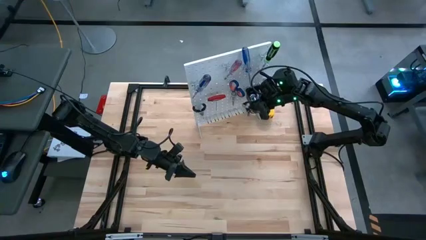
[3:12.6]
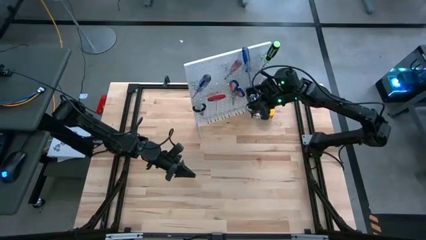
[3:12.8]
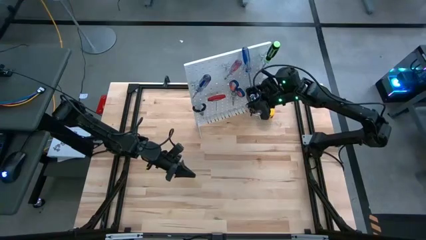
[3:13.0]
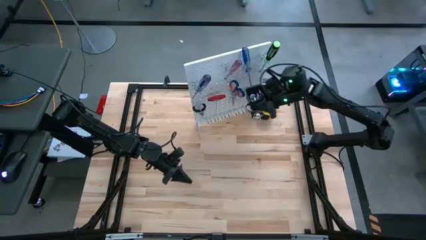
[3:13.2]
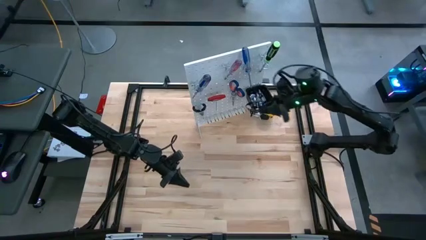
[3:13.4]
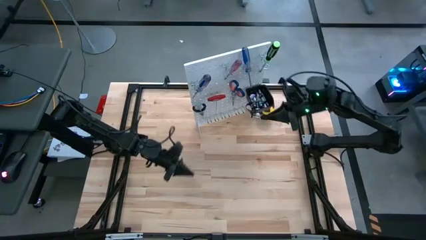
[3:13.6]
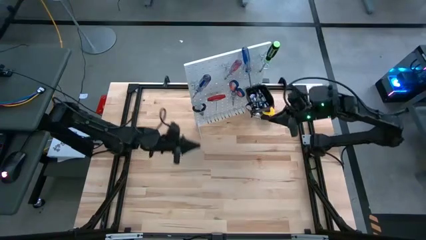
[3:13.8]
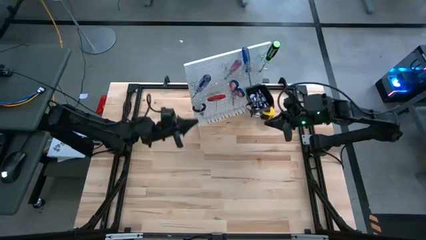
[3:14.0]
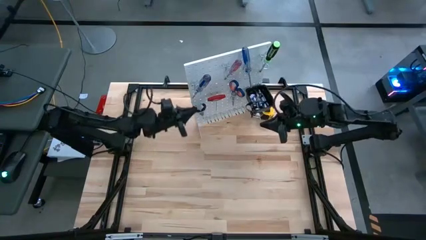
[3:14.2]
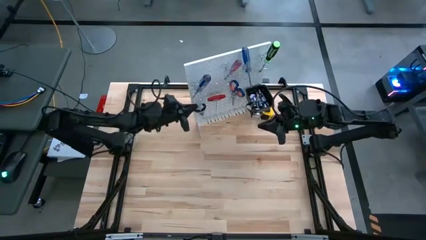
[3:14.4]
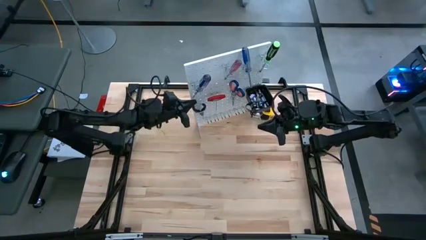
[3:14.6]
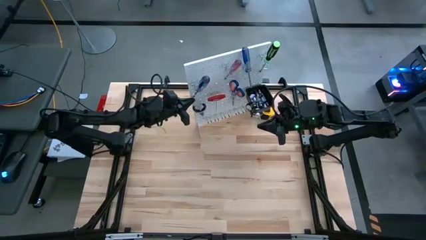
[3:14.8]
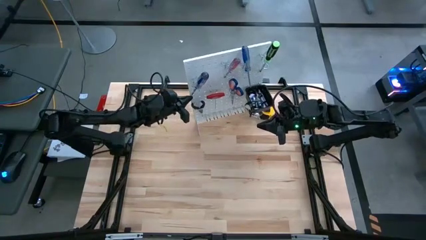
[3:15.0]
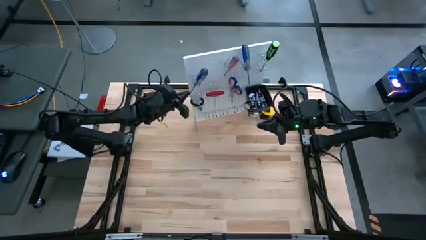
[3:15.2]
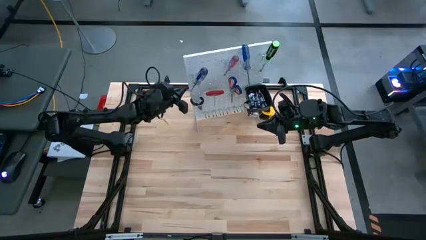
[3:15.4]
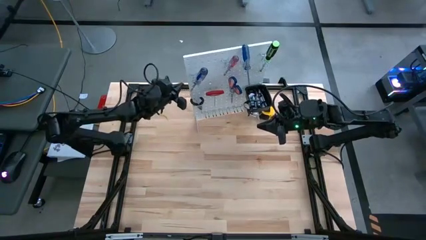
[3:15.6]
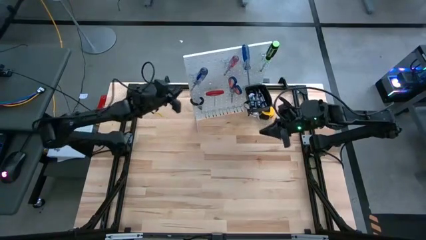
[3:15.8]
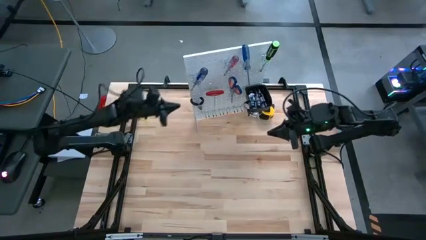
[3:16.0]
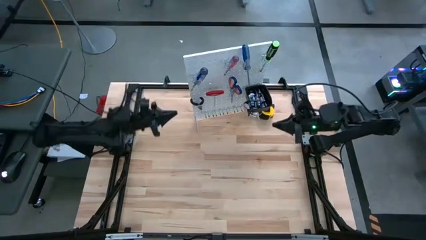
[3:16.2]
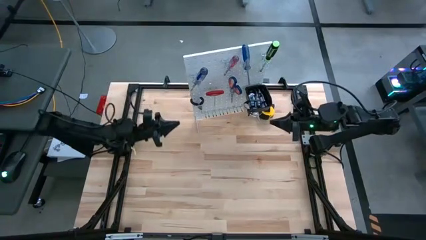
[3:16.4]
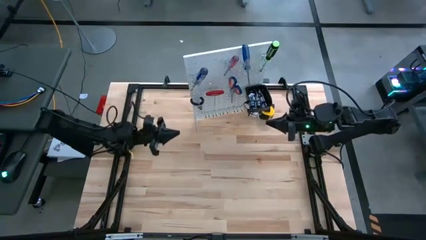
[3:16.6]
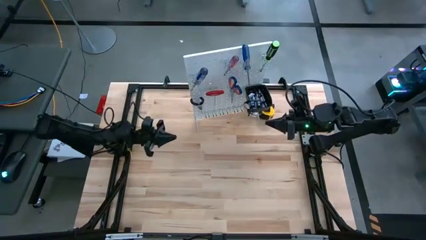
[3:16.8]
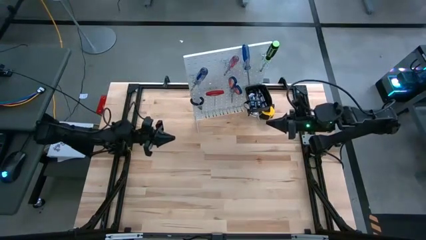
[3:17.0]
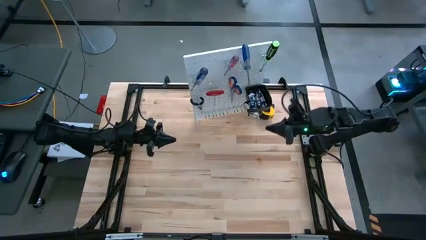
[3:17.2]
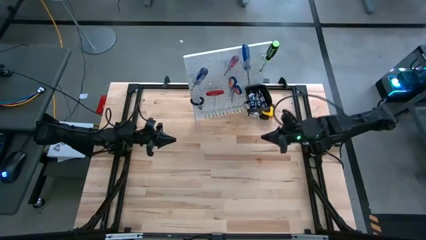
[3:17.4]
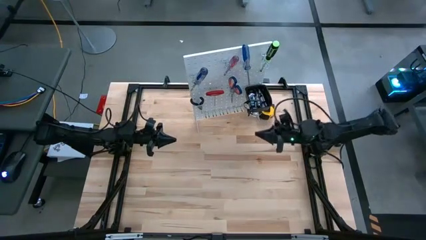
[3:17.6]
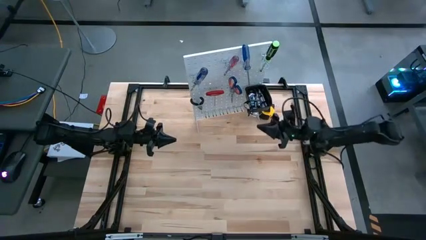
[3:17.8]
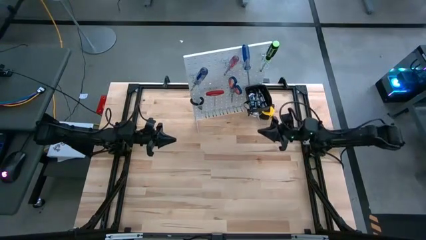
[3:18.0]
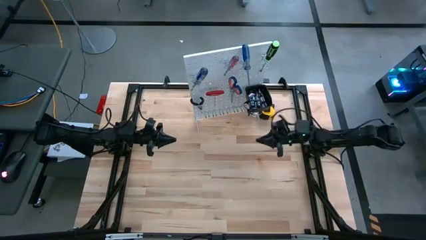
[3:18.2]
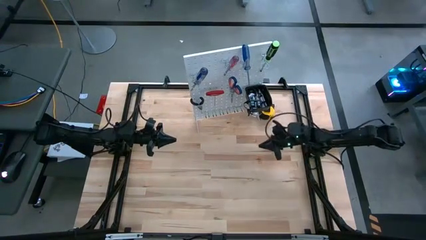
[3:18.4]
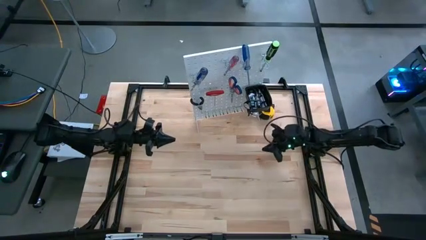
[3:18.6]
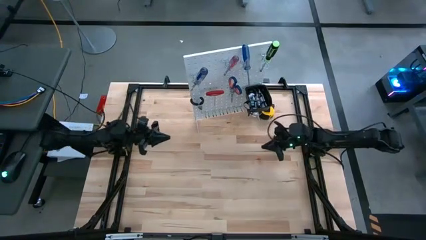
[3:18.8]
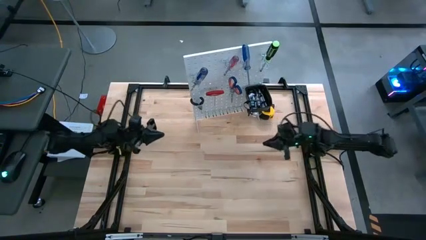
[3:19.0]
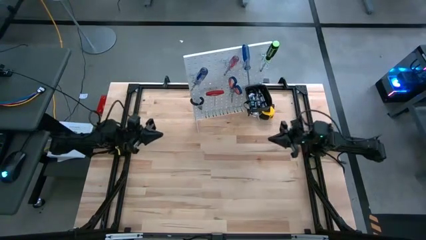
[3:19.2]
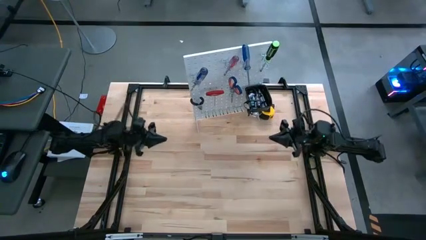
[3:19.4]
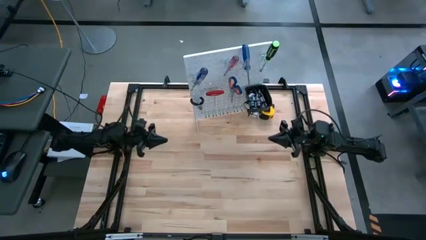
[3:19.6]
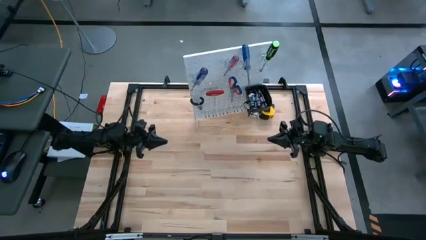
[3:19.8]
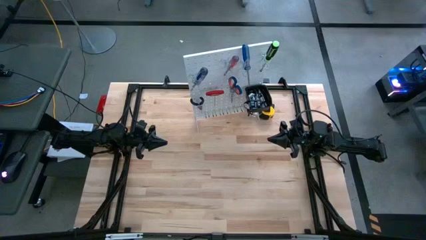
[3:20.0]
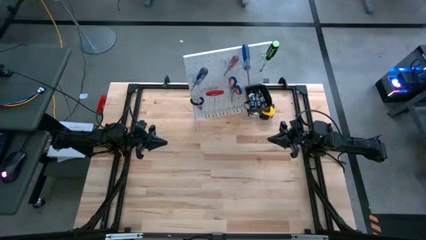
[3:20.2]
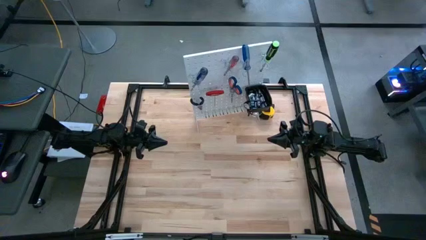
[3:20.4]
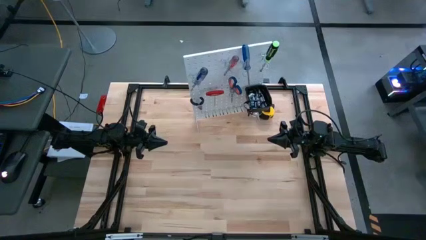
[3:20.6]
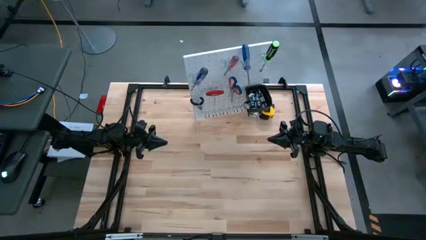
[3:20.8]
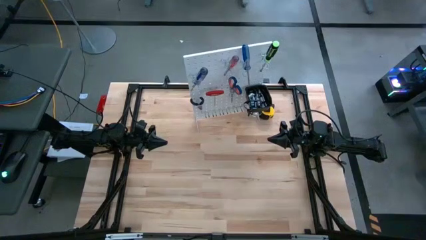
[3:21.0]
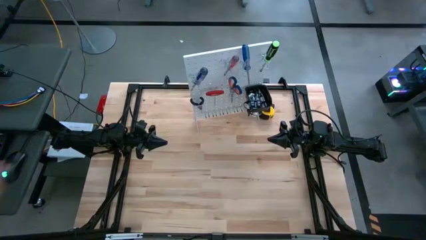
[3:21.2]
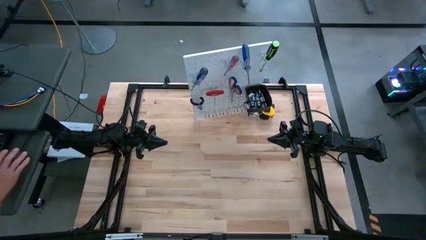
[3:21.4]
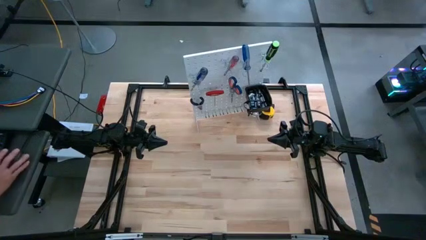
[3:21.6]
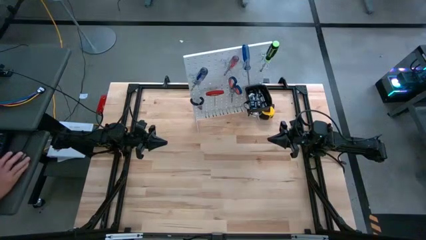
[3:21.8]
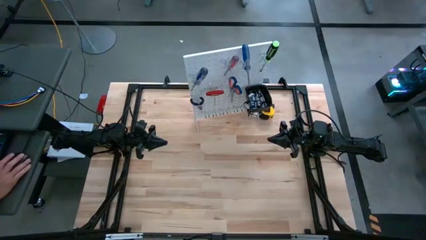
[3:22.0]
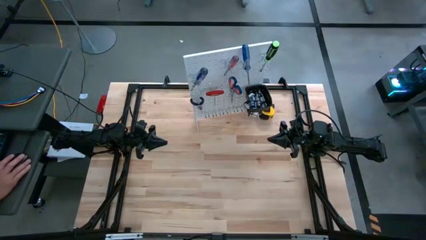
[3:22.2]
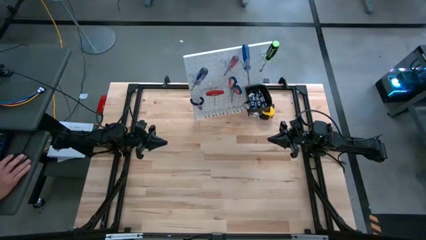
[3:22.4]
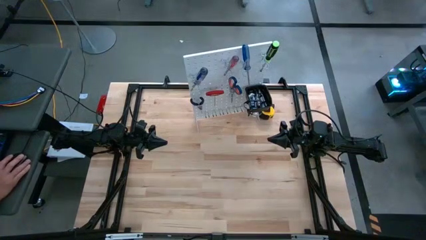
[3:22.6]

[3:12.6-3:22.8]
Task: Hang tools onto peg board
Return to Home Position

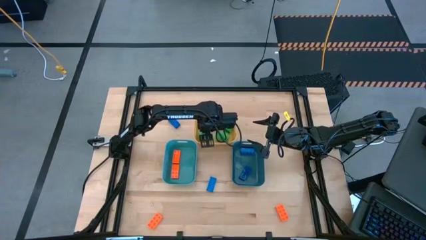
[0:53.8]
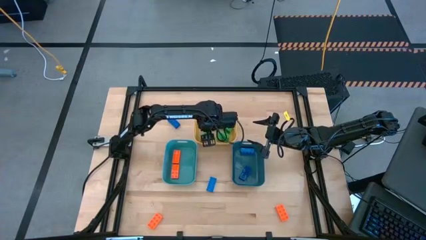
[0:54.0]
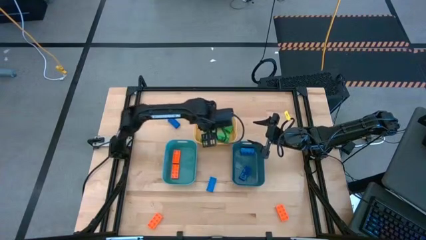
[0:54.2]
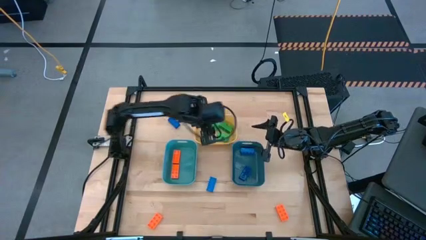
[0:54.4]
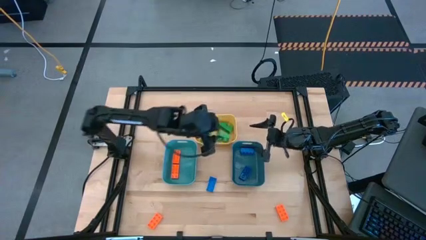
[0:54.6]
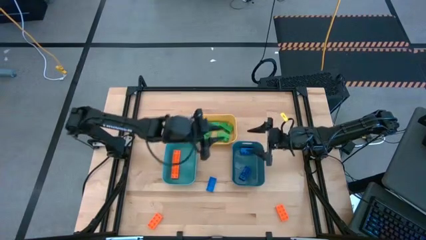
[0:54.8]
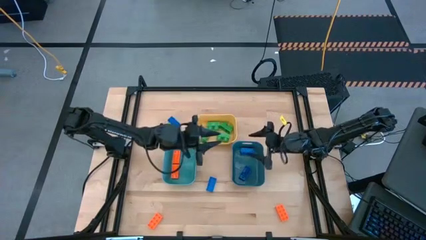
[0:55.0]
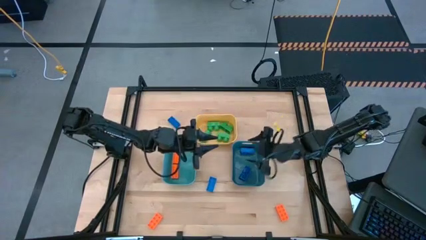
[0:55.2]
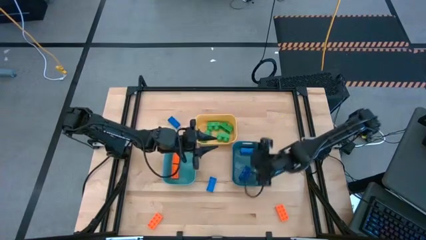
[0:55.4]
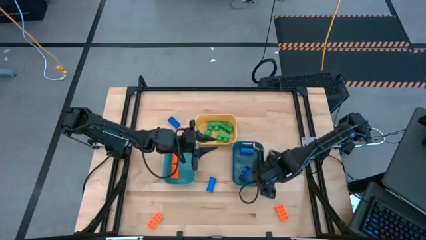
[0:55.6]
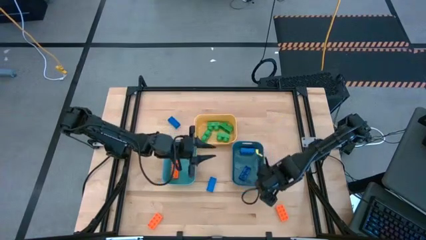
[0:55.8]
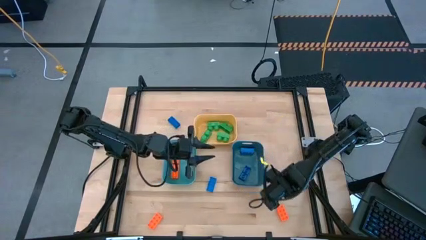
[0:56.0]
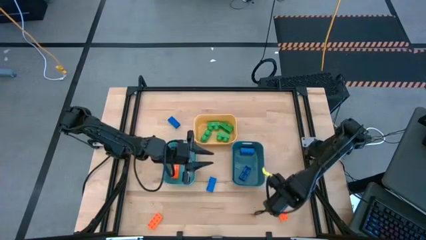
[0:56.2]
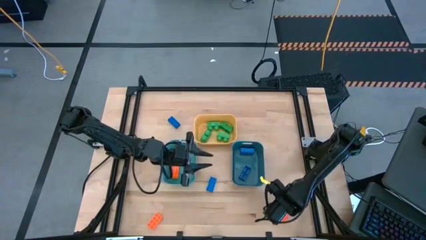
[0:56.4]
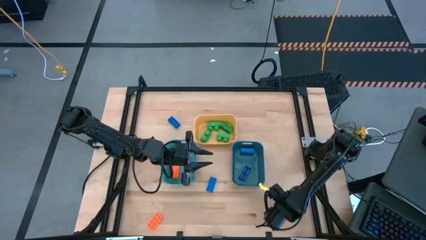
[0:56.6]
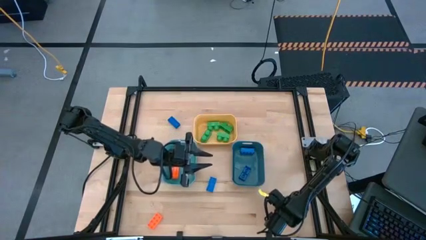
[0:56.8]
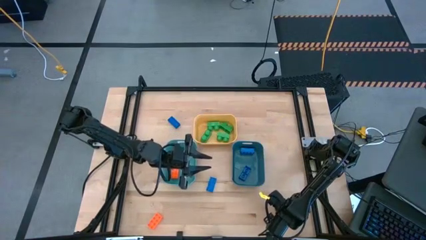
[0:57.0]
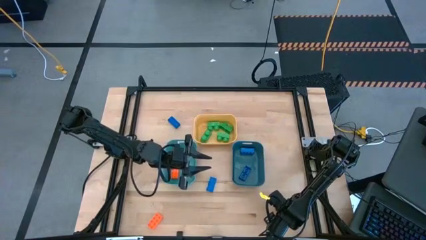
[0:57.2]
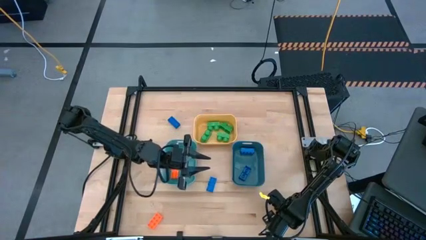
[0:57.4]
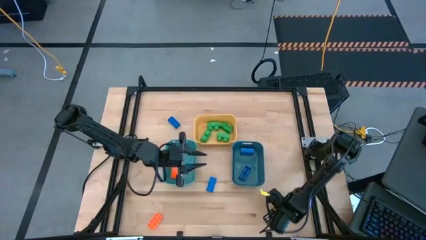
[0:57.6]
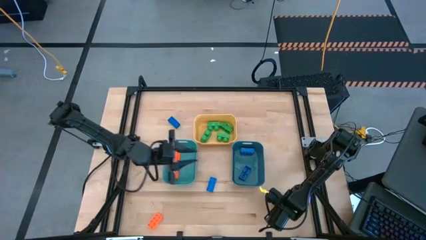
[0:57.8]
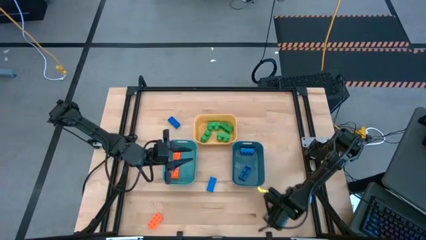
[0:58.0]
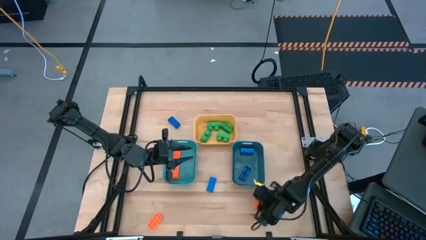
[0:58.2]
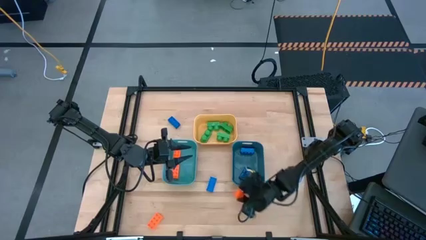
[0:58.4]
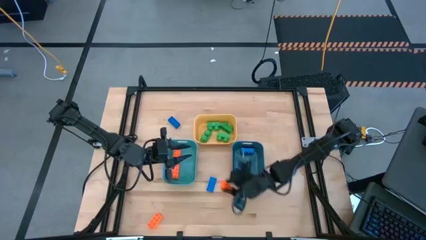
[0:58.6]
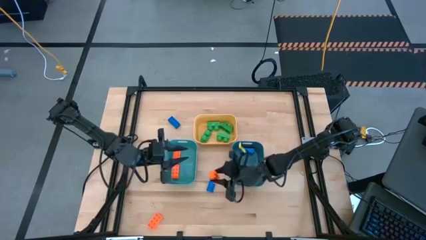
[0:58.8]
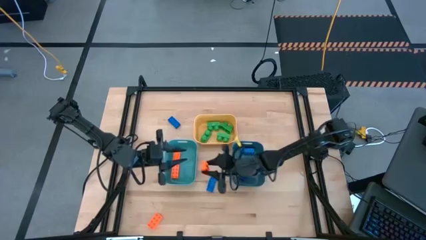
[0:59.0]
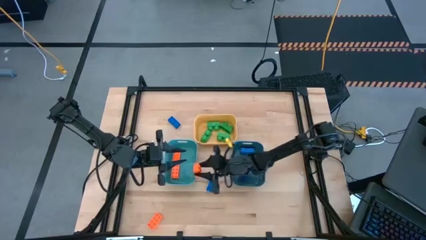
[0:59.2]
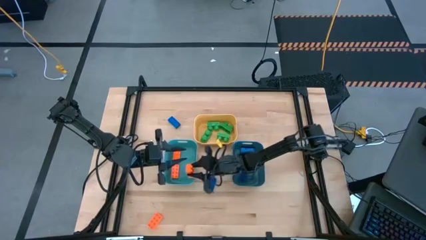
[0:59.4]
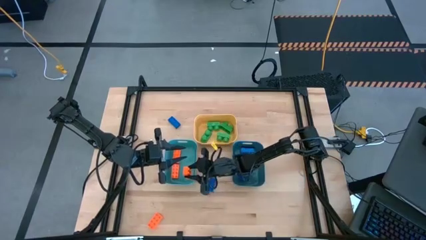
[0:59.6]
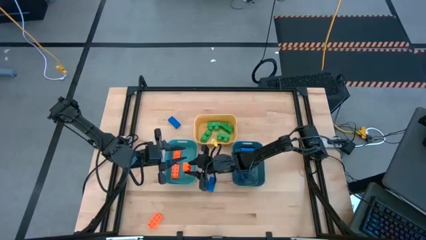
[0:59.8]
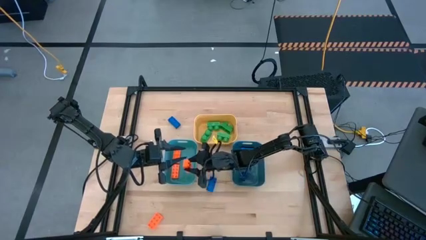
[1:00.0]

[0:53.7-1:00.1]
Task: Sort & place blocks by color
Put the orange game piece into the light blue bin
